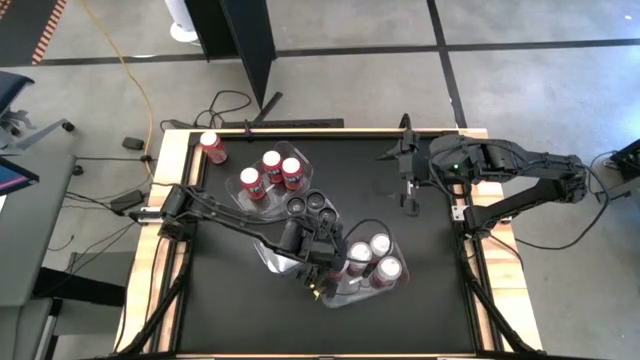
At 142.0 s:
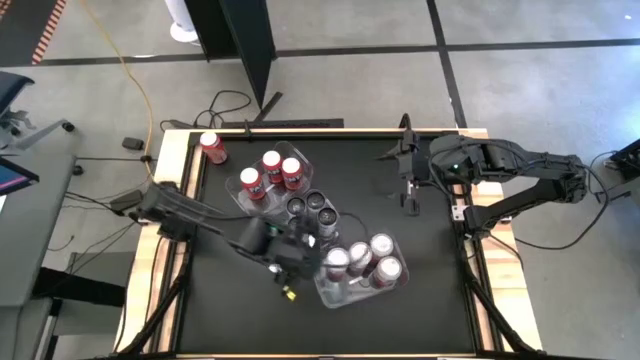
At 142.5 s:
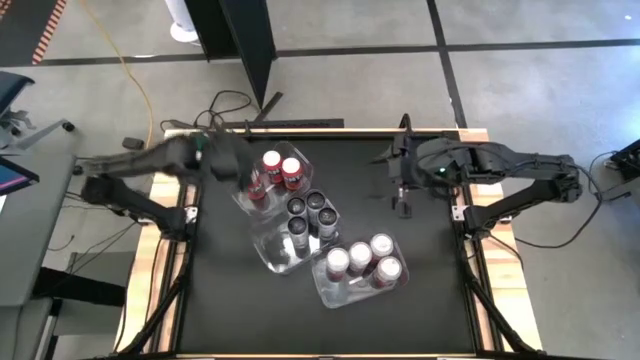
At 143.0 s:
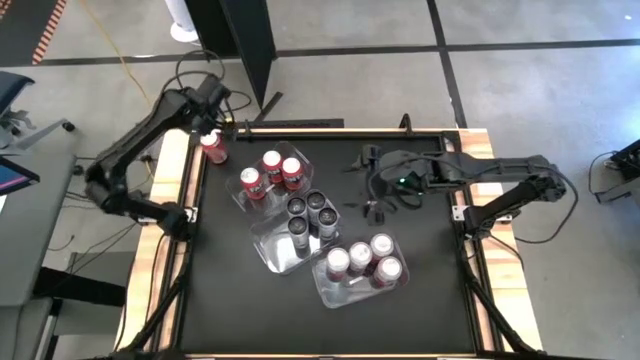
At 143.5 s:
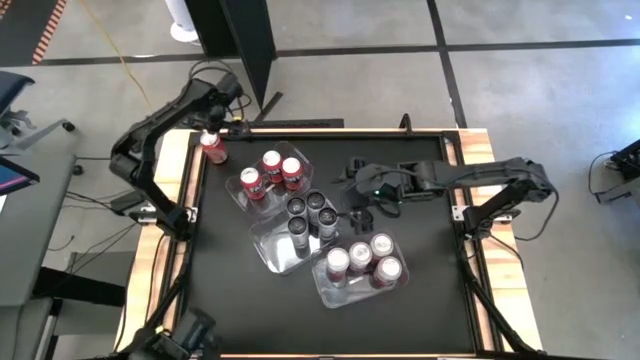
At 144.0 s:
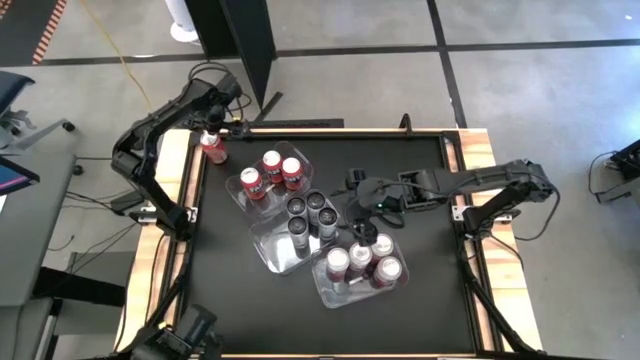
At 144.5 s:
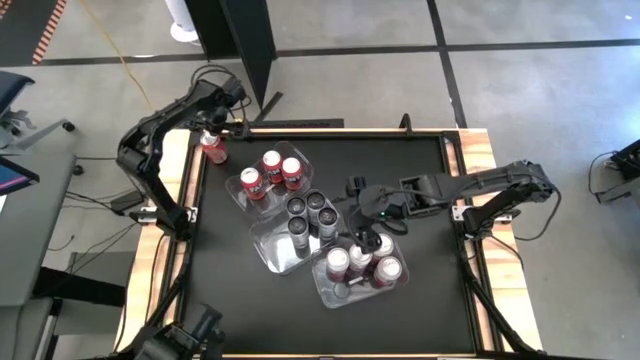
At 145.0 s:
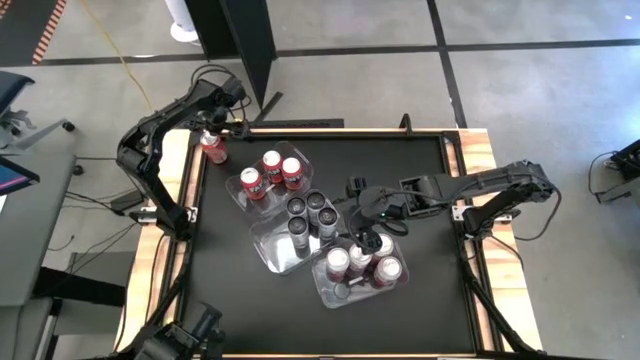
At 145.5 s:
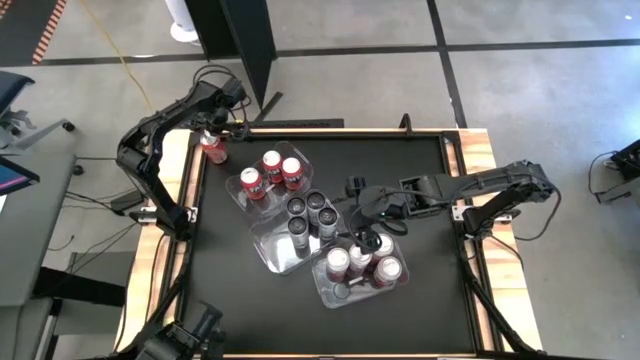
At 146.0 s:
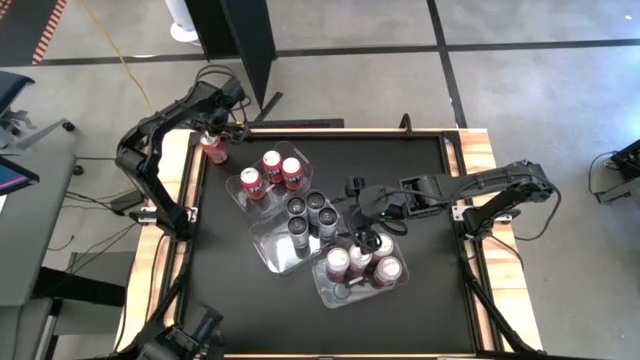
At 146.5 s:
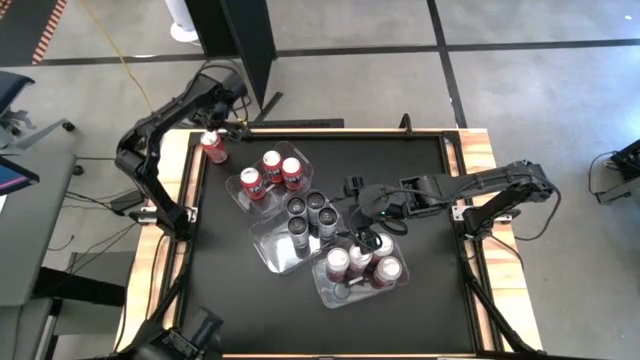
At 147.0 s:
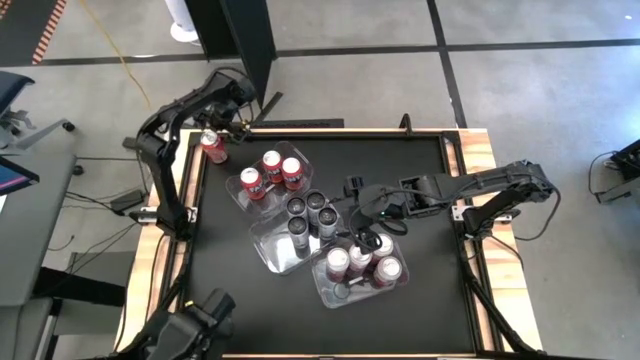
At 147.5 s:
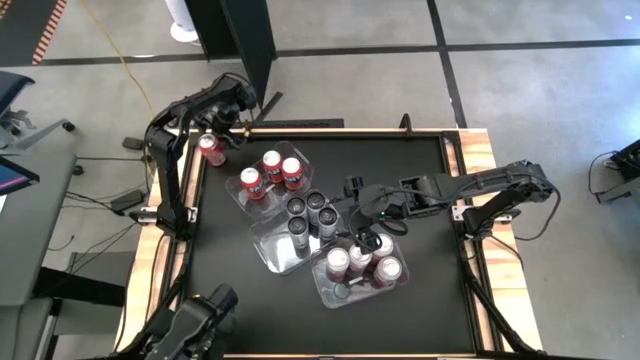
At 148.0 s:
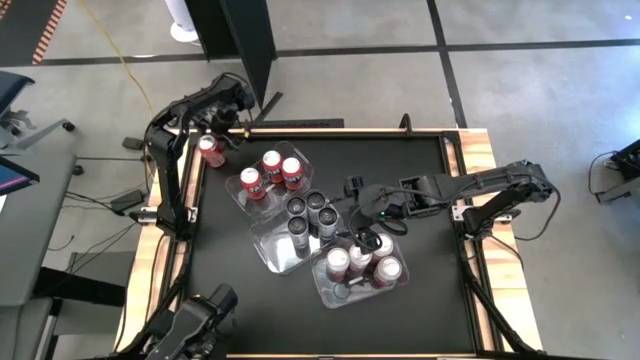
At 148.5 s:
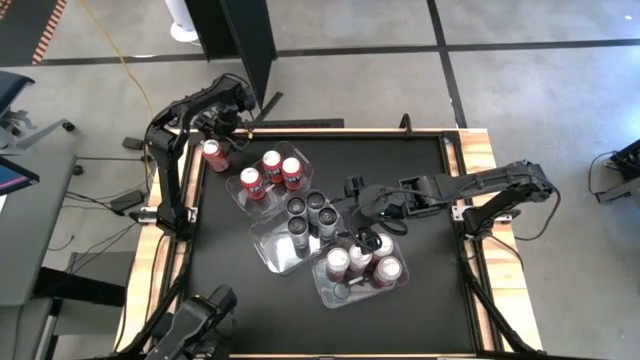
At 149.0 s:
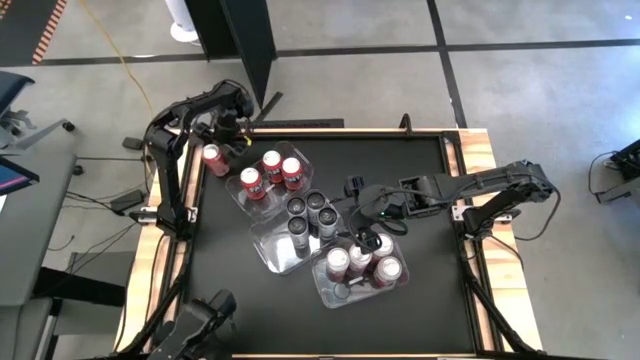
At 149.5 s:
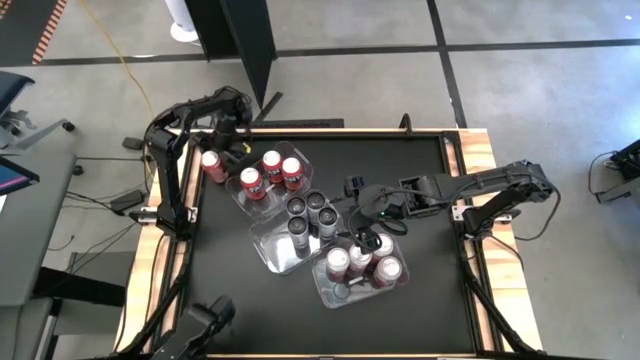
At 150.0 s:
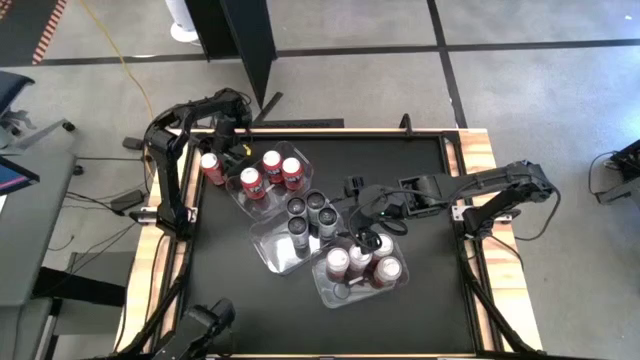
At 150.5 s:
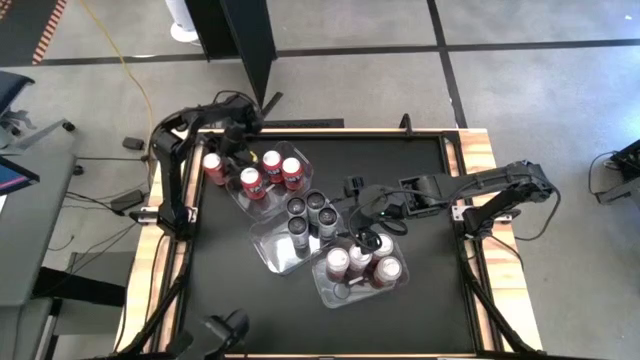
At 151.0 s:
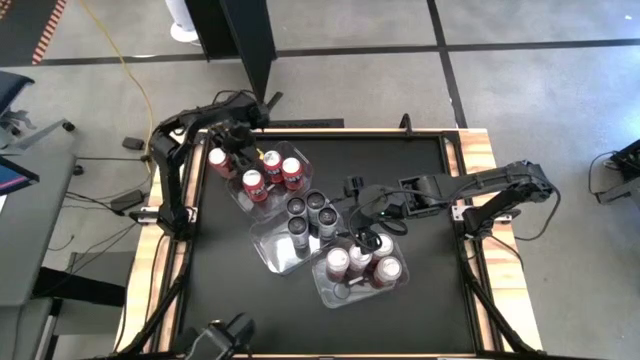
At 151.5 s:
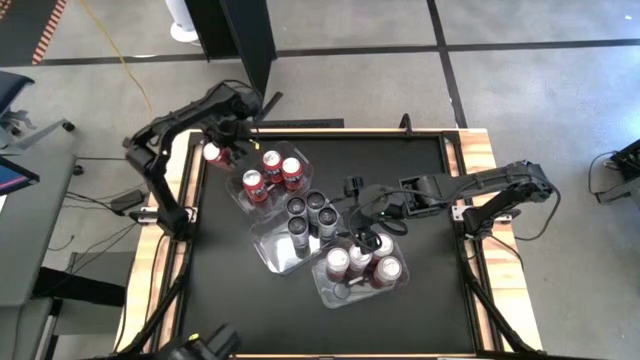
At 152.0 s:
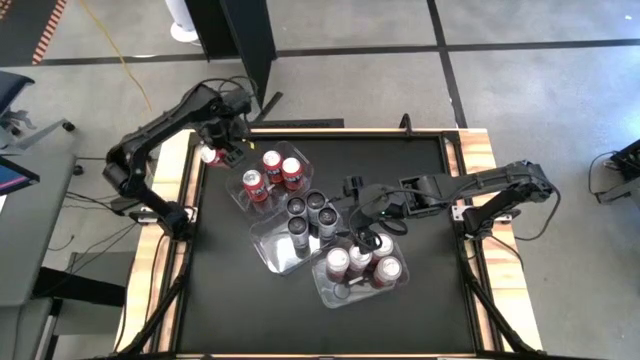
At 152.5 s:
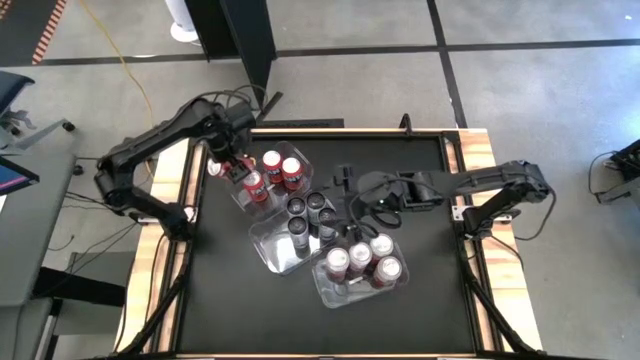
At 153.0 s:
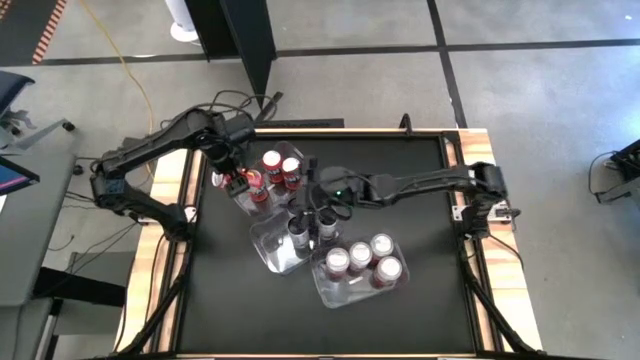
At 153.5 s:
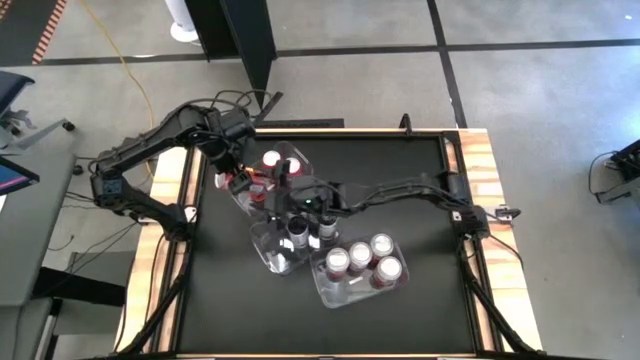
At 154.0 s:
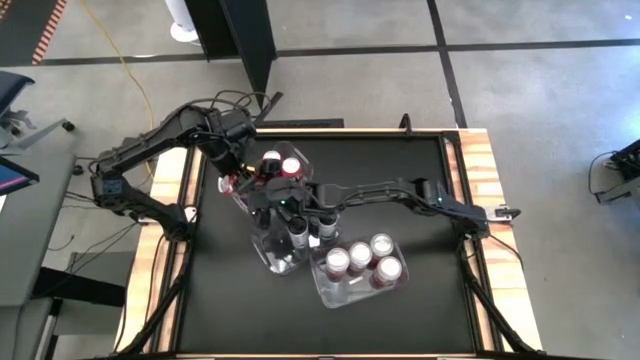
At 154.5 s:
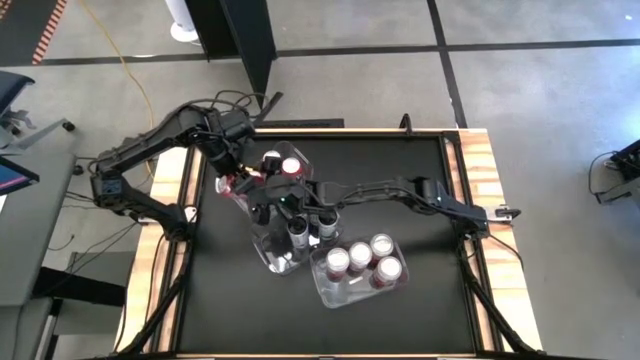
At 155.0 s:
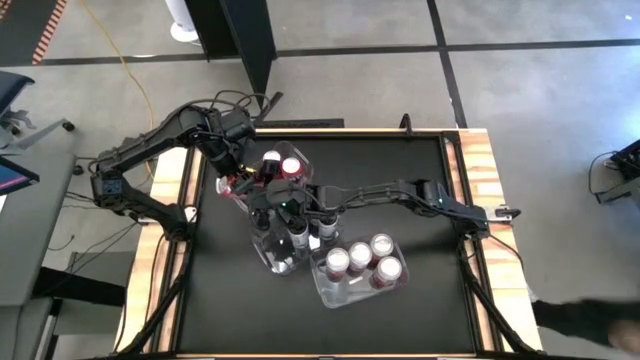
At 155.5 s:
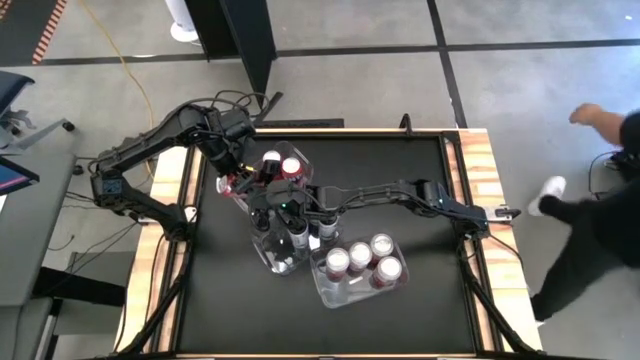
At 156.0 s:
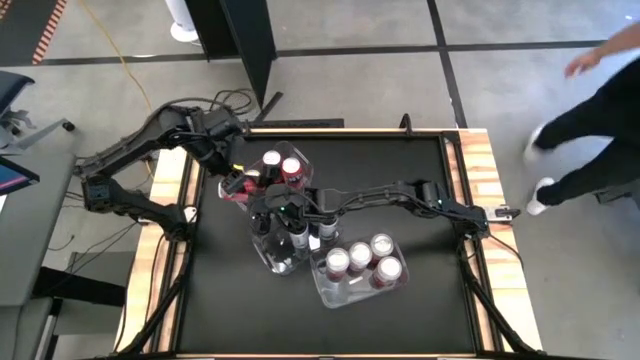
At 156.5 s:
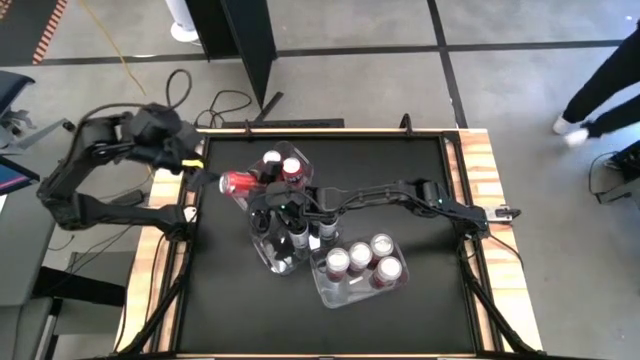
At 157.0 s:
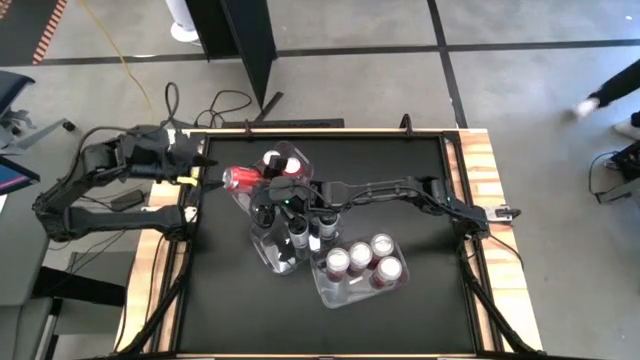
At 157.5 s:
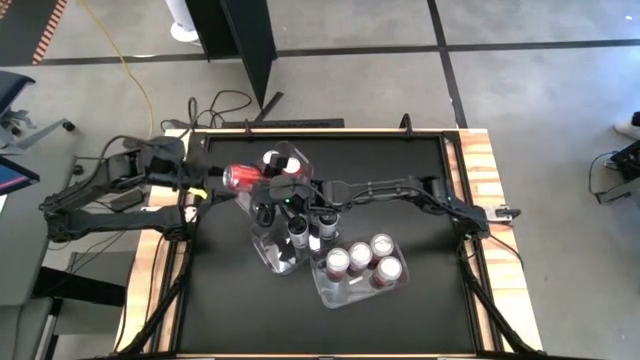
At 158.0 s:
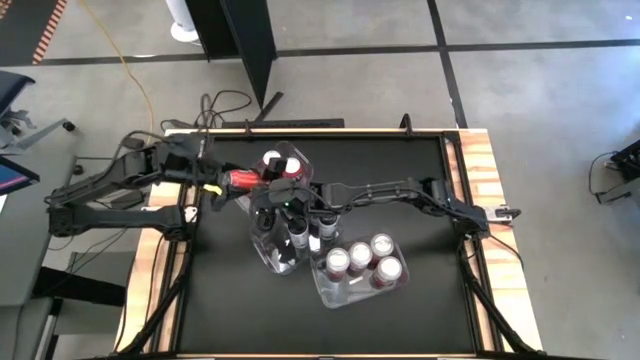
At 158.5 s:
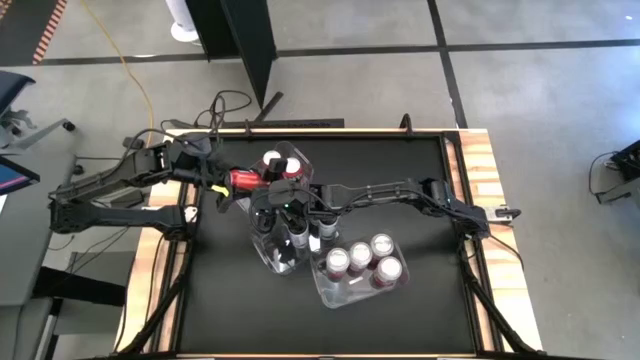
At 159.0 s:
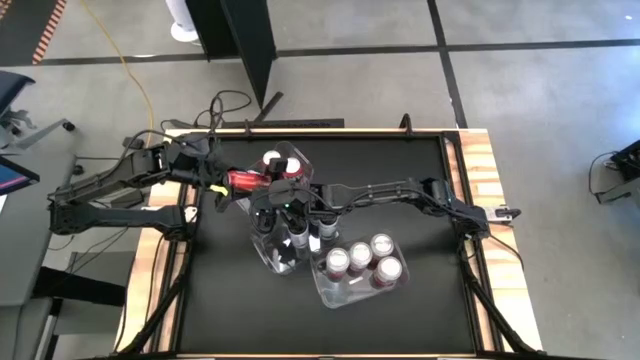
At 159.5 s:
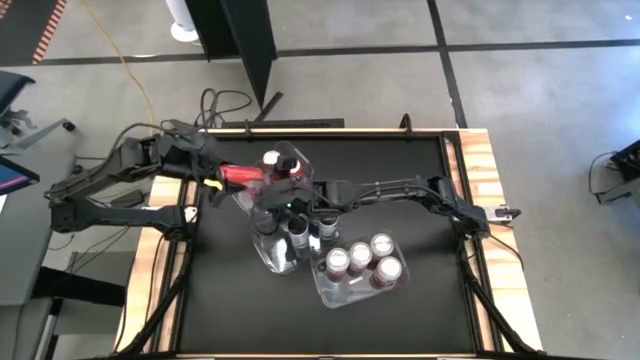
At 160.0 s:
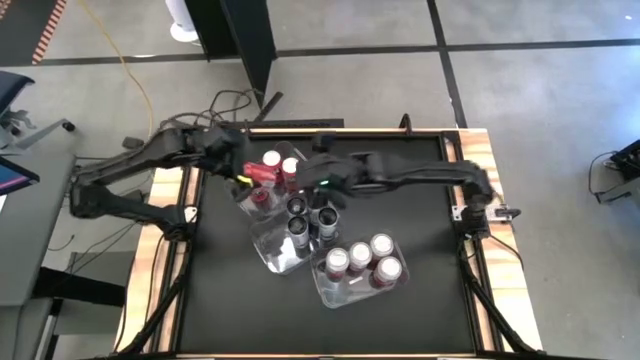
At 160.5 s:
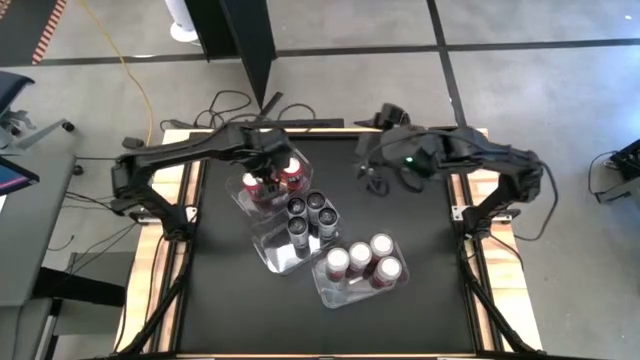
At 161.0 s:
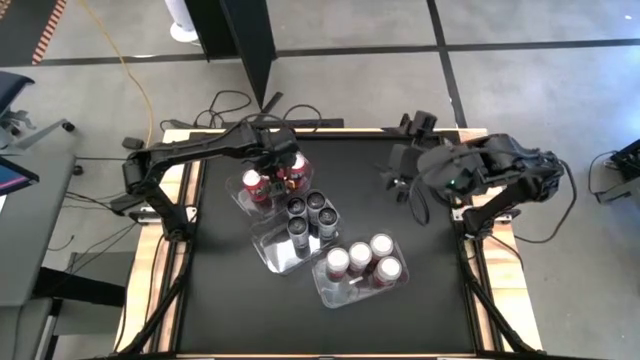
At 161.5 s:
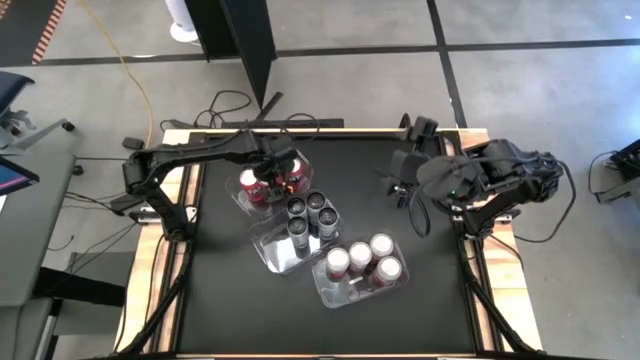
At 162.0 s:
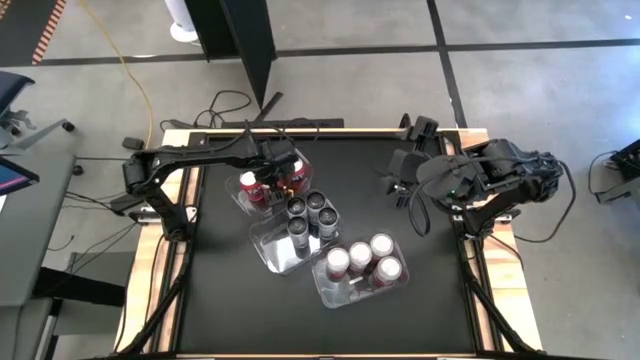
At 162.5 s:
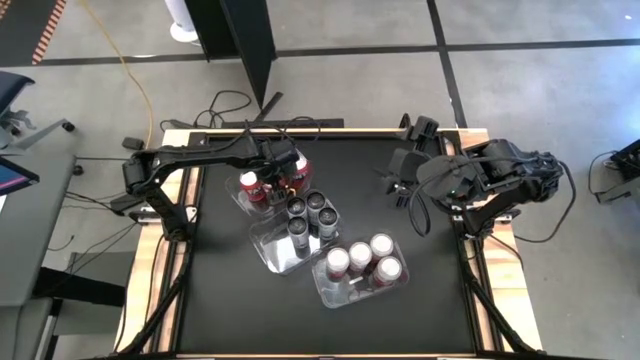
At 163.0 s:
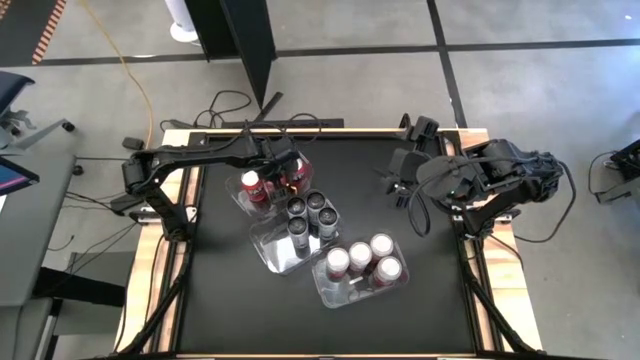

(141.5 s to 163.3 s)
Task: Sort soda cans
Put the orange soda can in the top left transparent bin
